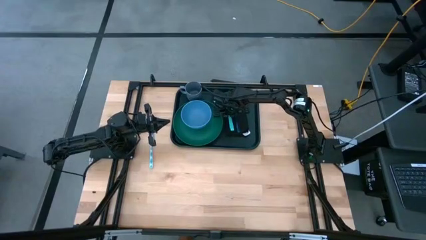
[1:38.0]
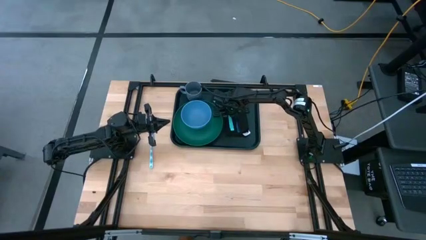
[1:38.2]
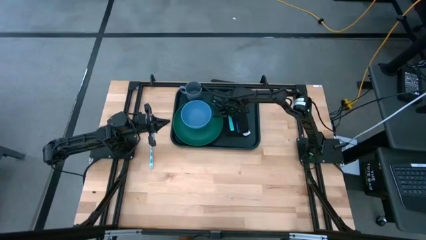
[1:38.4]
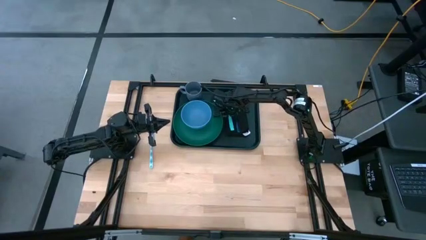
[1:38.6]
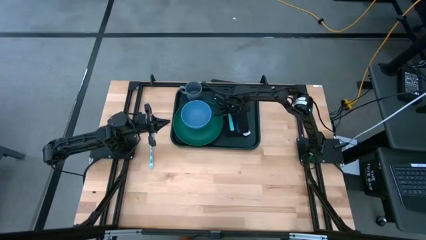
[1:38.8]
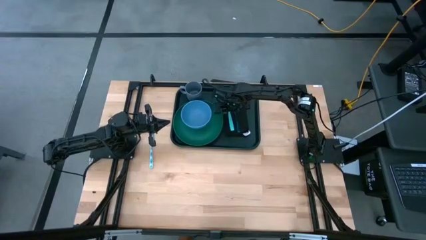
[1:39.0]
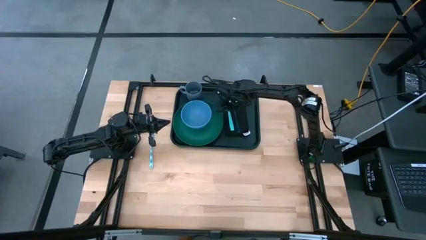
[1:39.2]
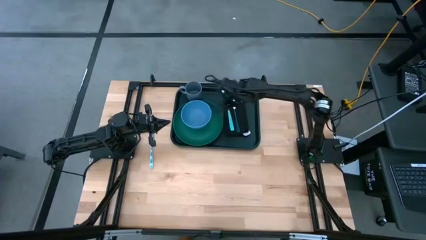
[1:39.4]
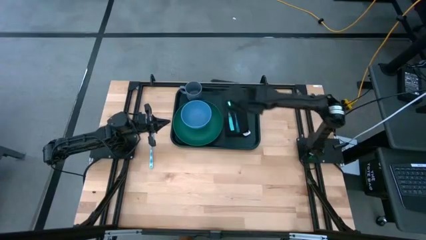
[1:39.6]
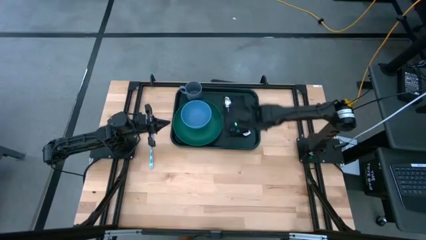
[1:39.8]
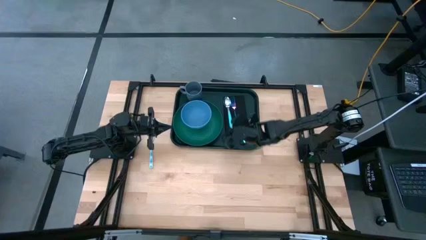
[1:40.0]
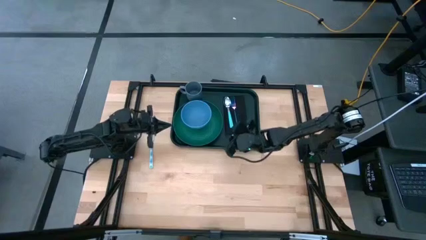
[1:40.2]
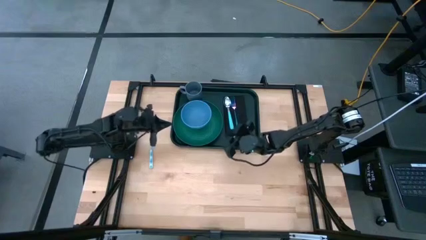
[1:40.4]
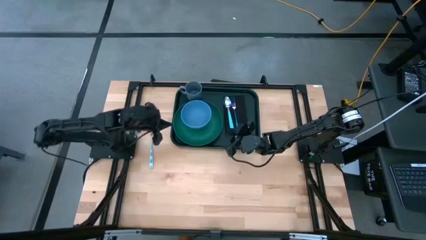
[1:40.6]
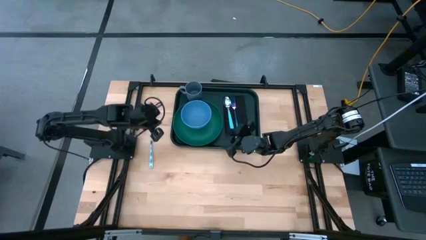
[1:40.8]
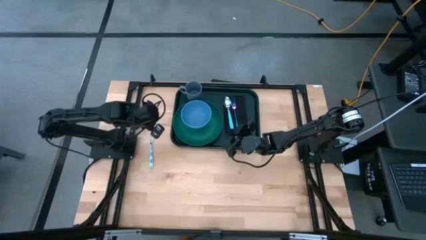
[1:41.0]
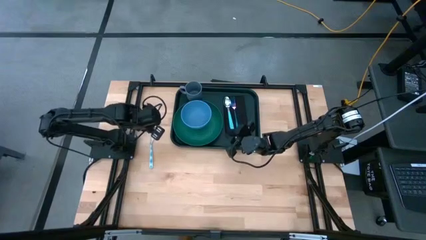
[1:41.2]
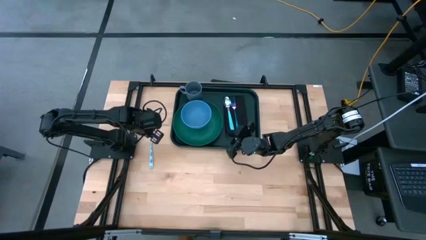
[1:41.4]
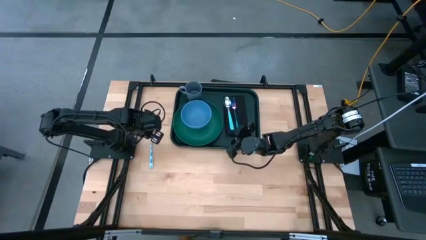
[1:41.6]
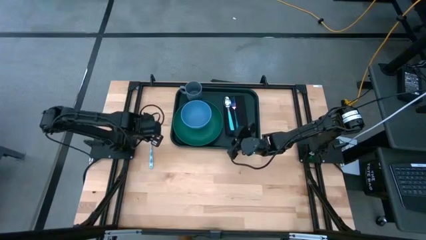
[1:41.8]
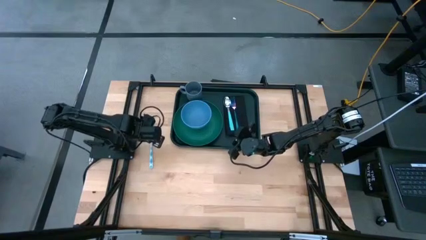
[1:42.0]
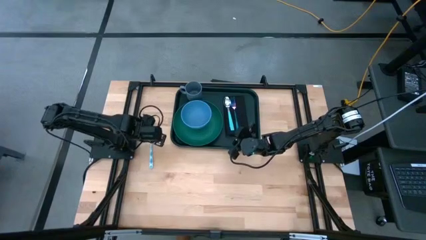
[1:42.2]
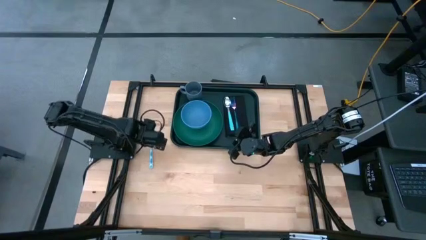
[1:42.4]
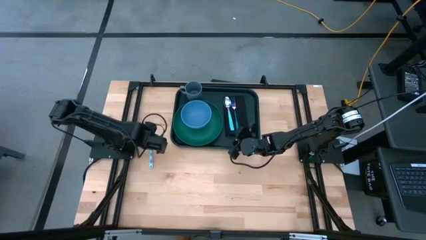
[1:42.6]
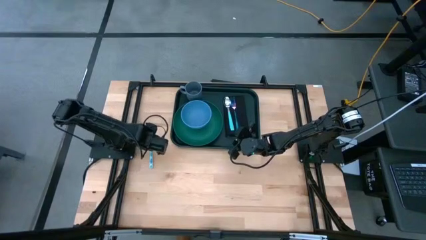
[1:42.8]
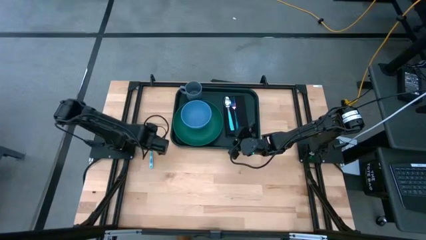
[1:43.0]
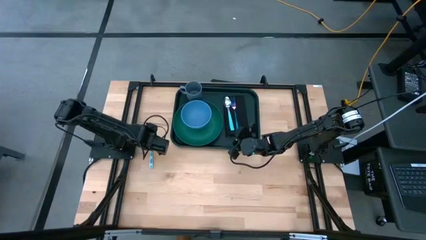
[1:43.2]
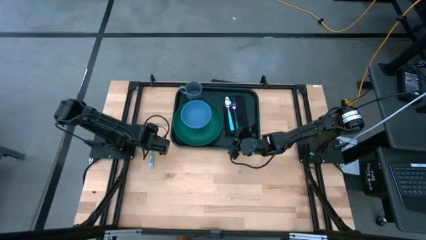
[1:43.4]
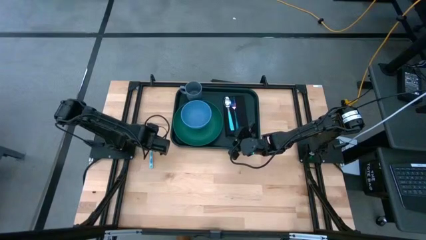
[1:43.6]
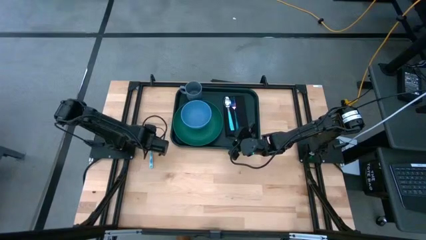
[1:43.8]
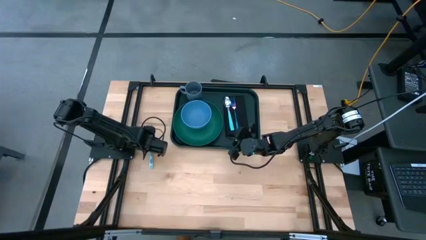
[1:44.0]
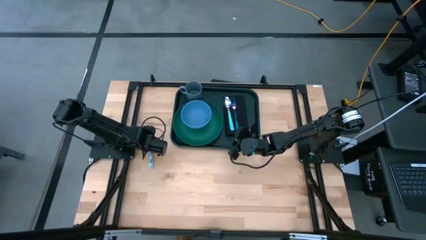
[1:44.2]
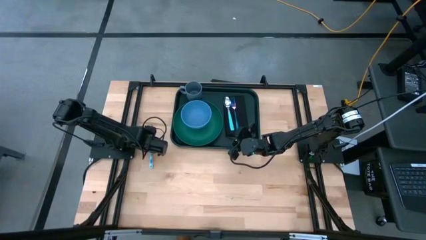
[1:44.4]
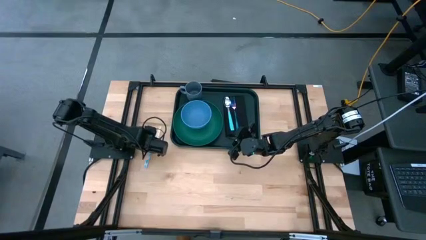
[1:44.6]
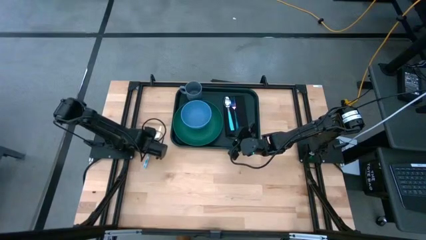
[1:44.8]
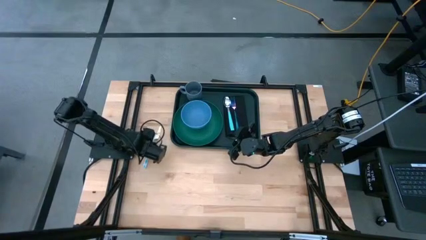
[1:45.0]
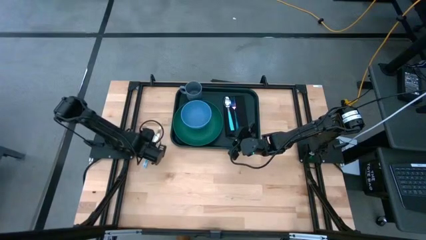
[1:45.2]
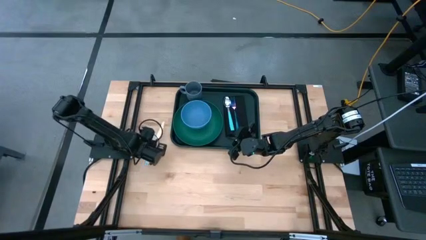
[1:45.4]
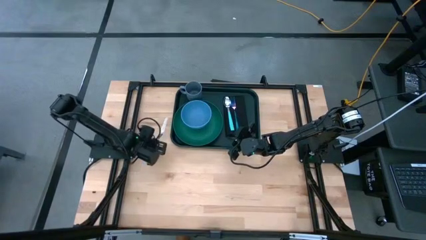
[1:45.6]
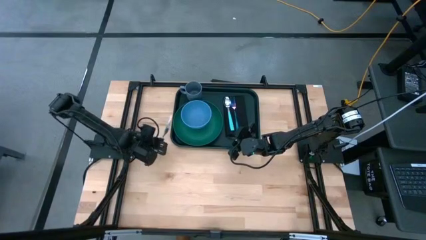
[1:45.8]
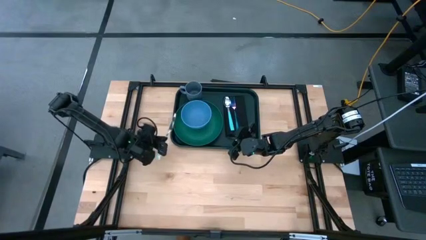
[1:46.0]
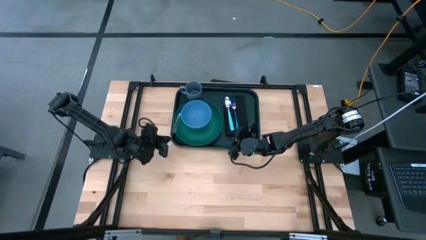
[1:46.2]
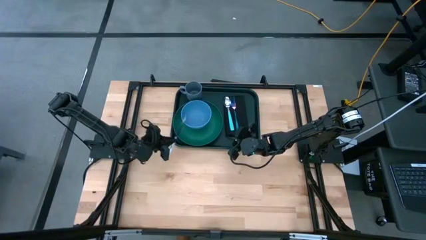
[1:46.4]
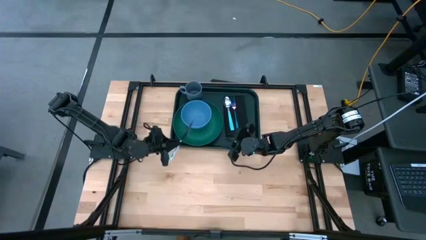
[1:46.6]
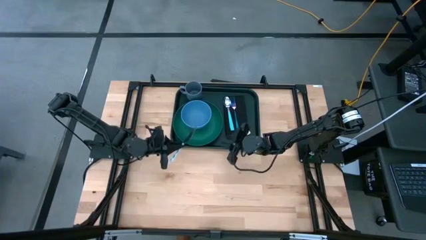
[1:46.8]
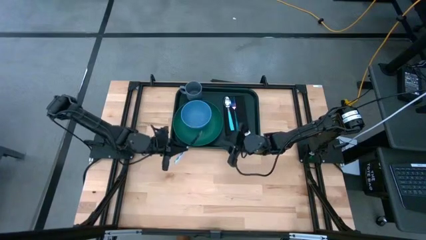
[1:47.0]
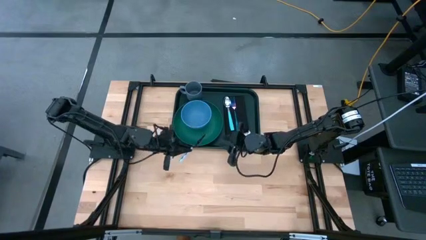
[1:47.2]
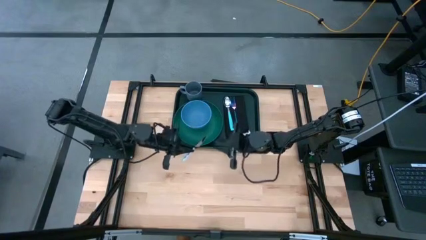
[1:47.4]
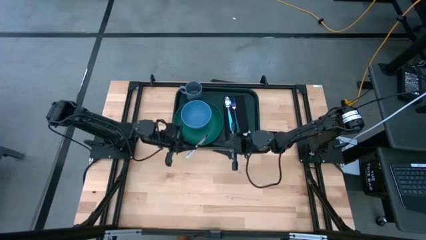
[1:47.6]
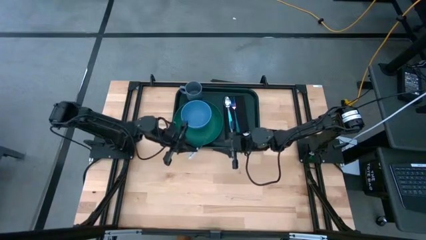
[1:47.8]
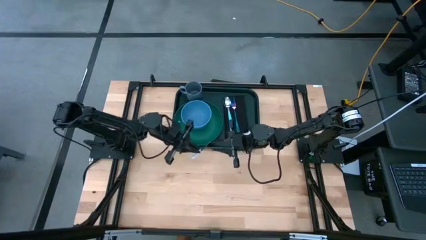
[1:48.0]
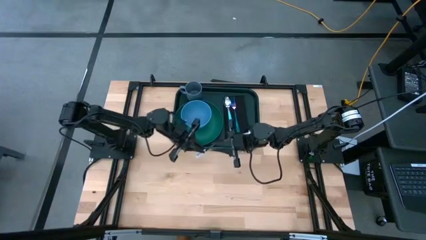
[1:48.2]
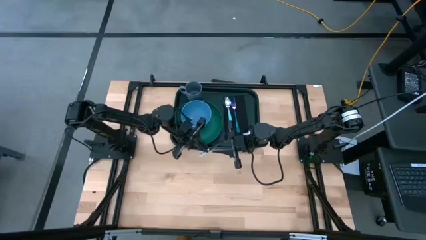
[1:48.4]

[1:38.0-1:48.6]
Task: Set up tray
Put the white and blue knife on top of the black napkin to the right of the purple fork

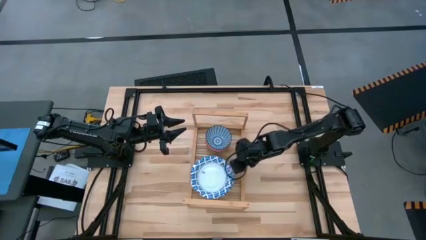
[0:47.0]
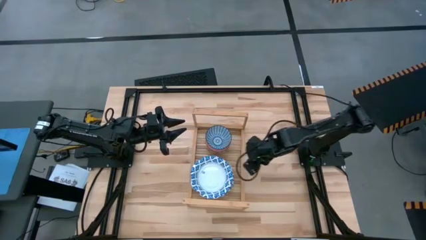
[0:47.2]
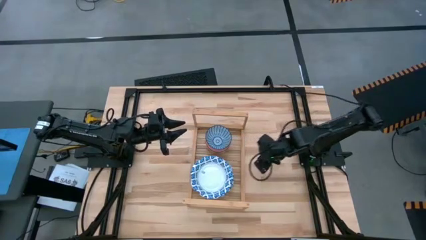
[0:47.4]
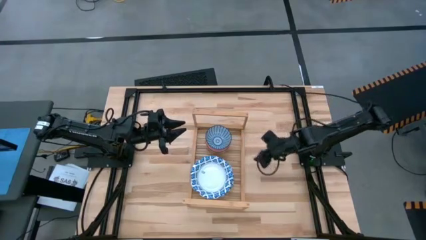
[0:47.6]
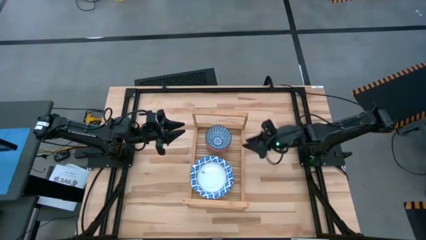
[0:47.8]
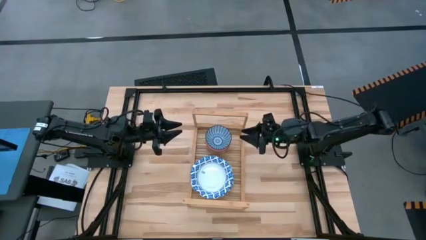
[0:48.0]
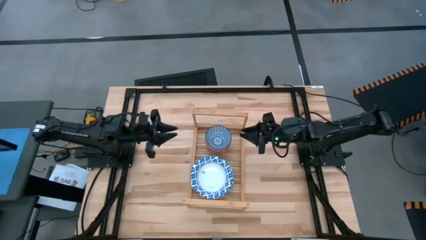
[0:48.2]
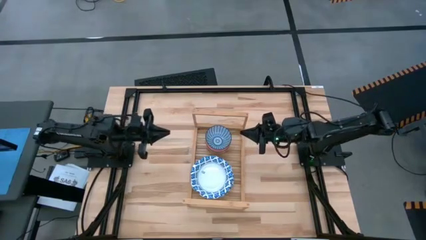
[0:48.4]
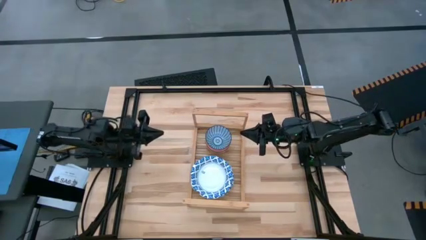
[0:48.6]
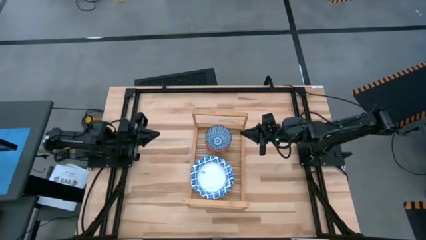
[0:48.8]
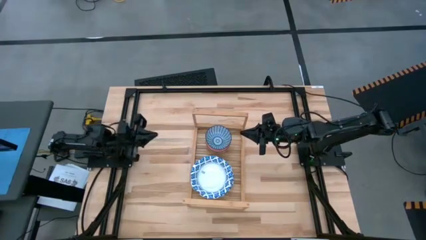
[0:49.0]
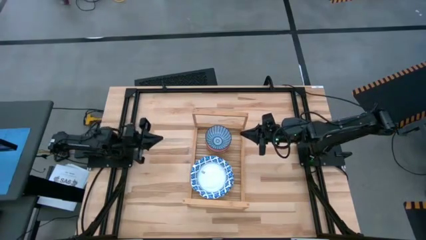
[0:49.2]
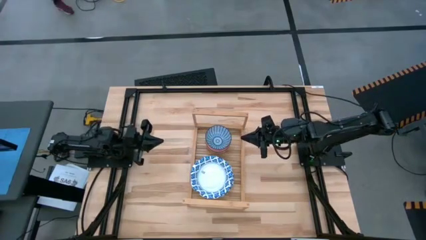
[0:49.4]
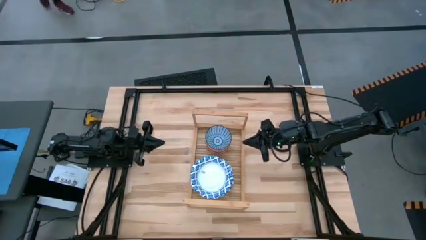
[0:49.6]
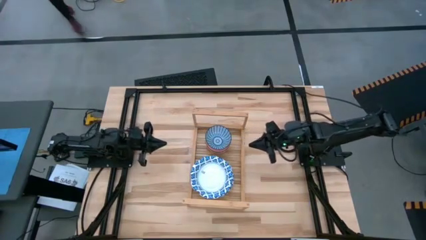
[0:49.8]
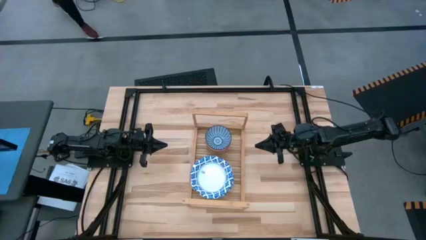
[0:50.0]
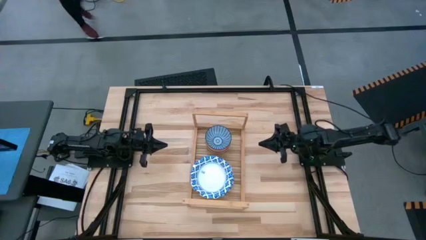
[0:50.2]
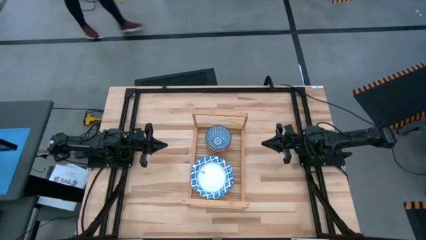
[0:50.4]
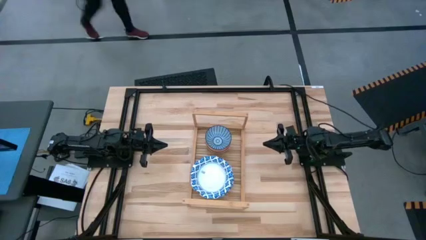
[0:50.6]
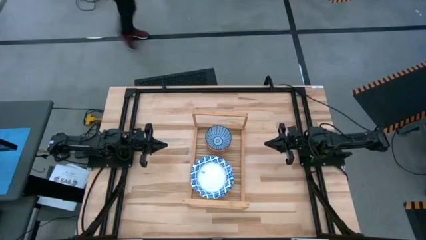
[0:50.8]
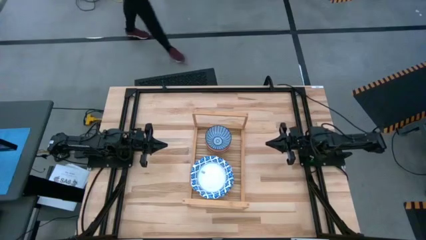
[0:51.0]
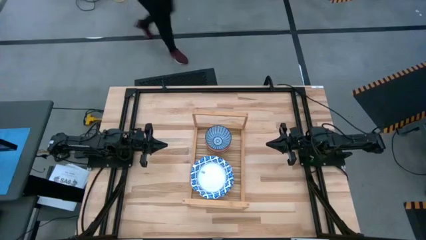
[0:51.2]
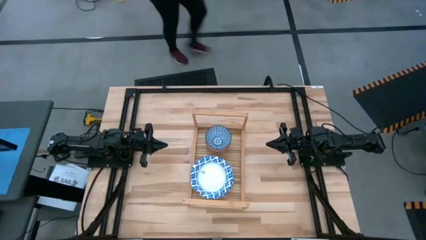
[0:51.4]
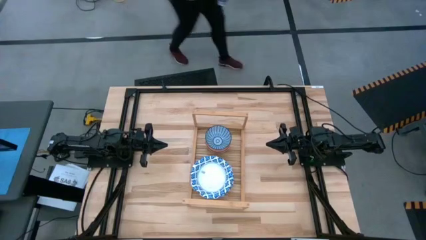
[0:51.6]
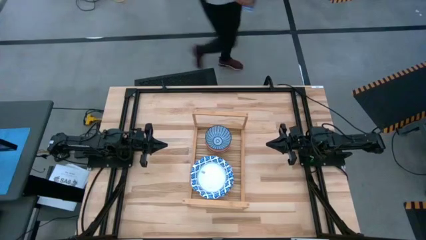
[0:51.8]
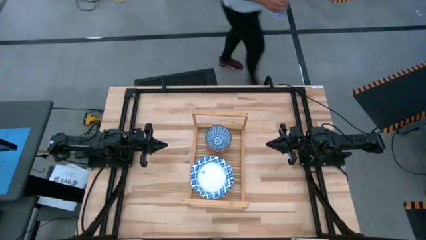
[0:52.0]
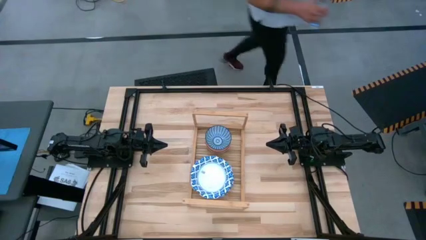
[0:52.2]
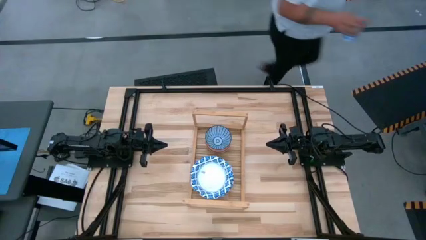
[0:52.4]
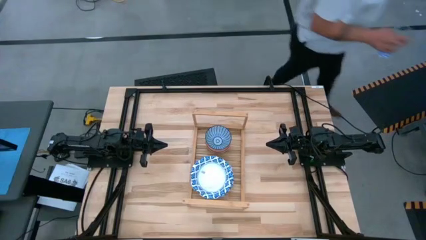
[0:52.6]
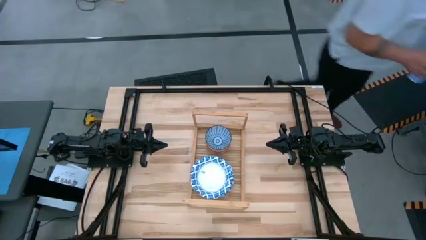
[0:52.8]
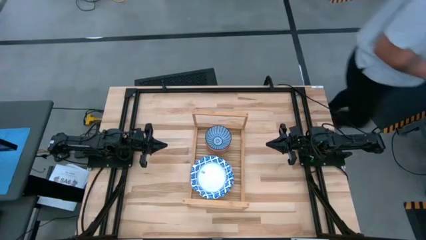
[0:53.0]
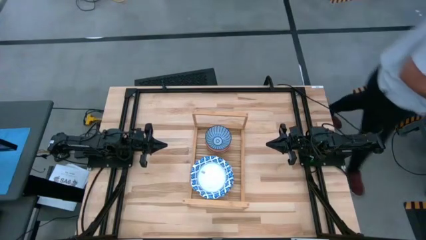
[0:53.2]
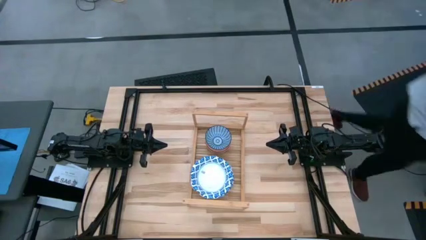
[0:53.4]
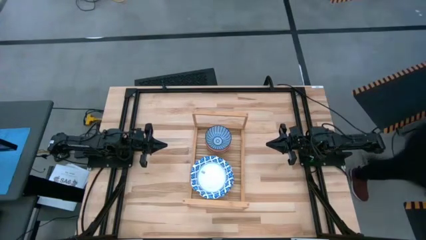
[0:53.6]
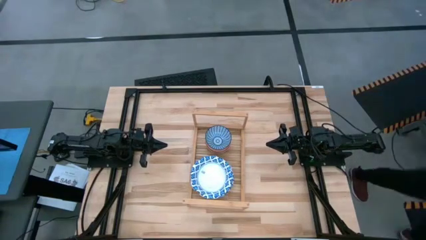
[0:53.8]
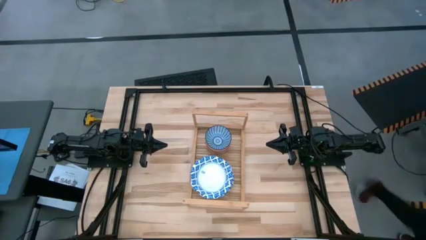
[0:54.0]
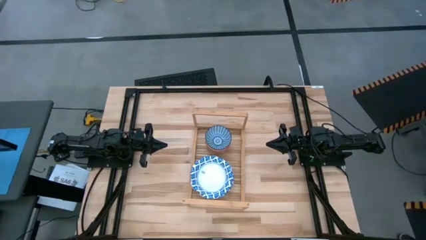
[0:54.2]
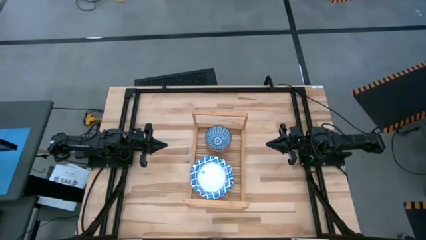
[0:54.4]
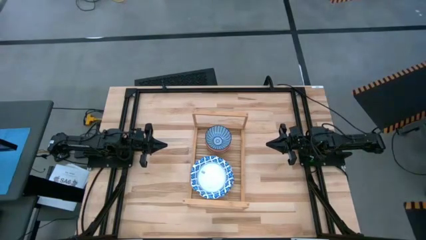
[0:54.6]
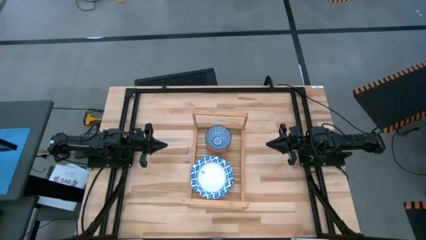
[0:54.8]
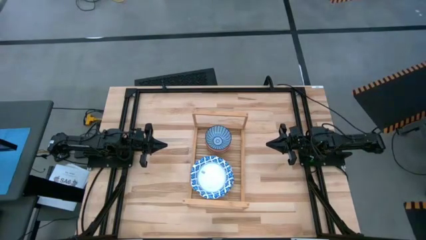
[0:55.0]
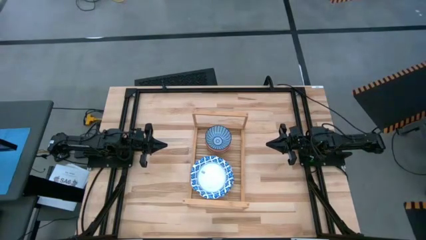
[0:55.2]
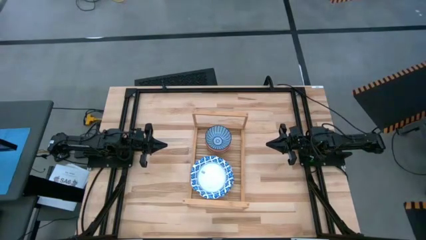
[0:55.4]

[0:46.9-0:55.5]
Task: Place and stack bowls onto a shelf
Return to Home Position
